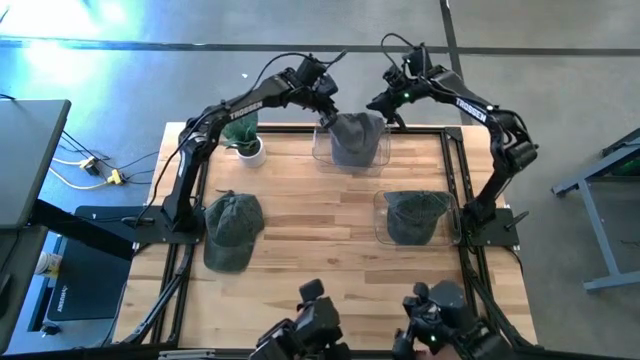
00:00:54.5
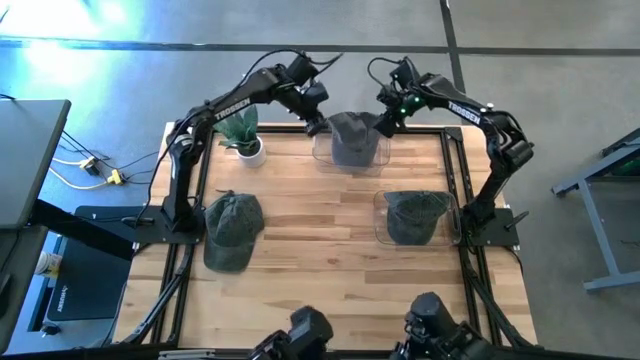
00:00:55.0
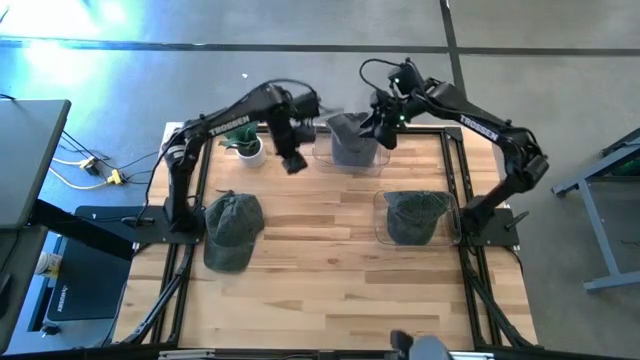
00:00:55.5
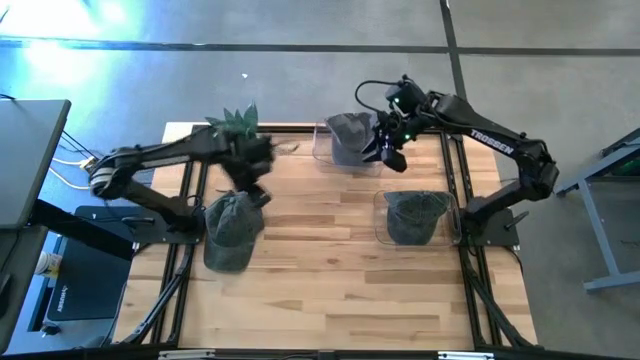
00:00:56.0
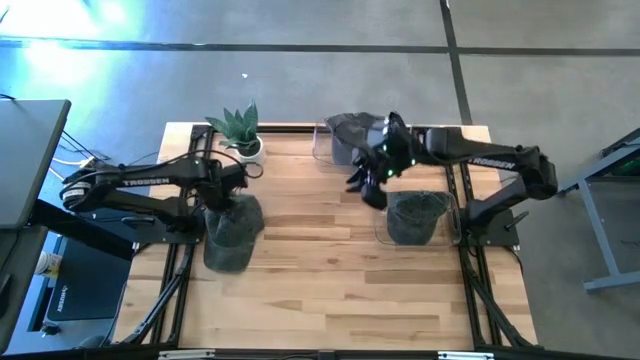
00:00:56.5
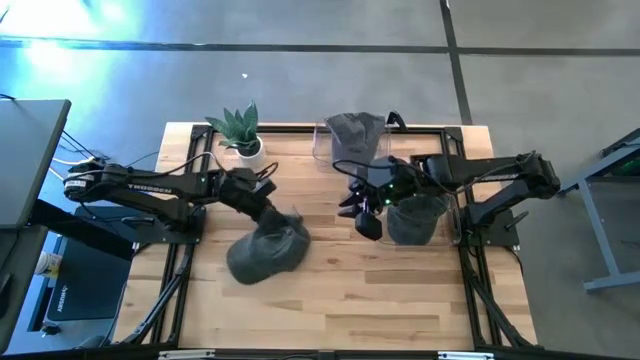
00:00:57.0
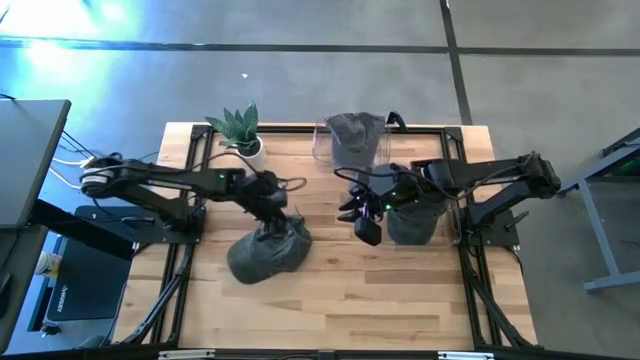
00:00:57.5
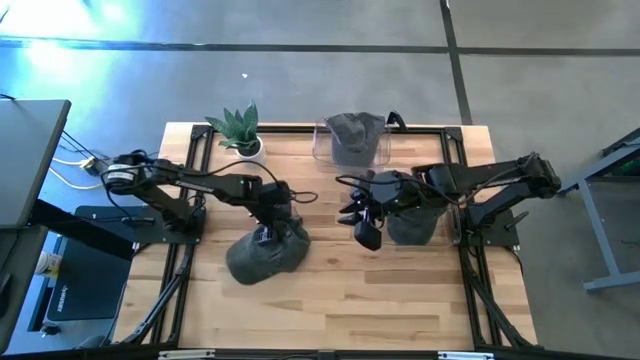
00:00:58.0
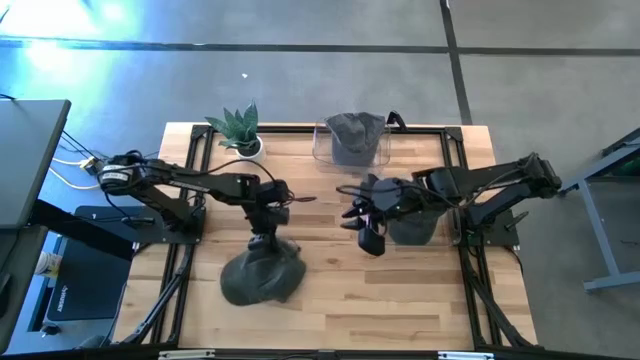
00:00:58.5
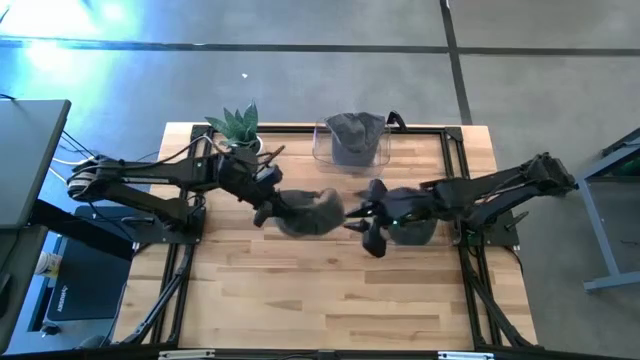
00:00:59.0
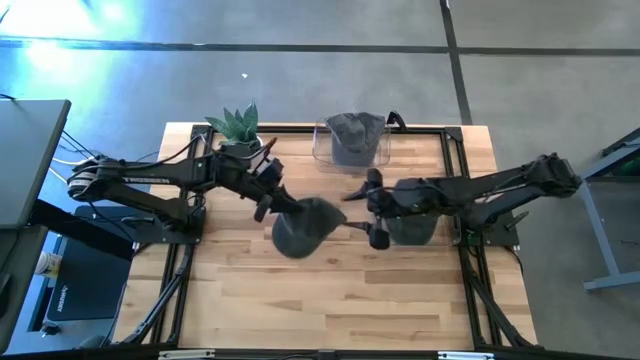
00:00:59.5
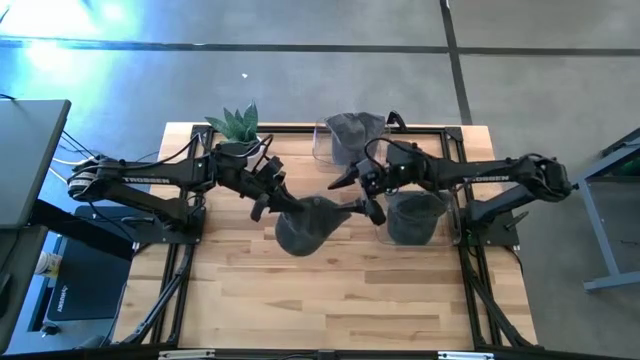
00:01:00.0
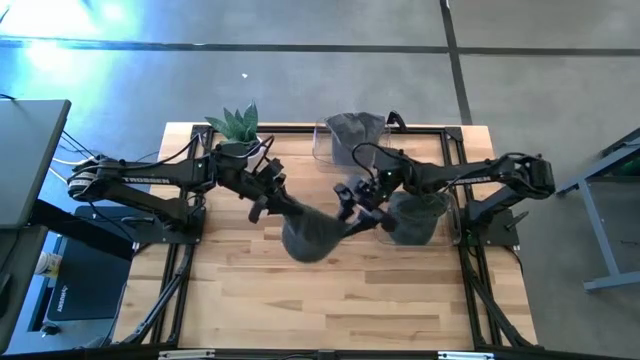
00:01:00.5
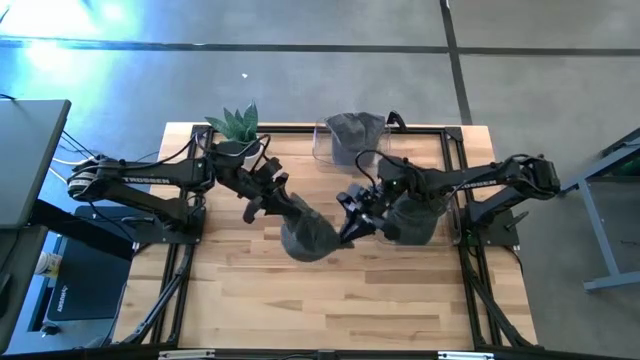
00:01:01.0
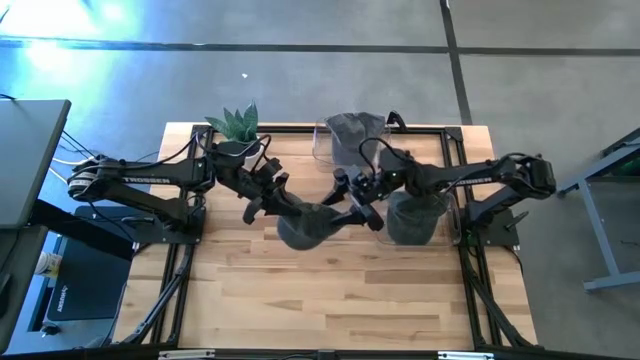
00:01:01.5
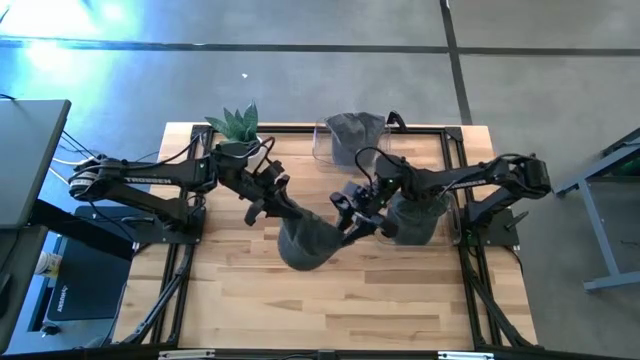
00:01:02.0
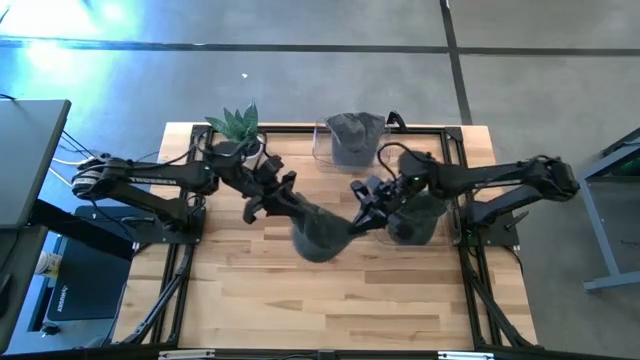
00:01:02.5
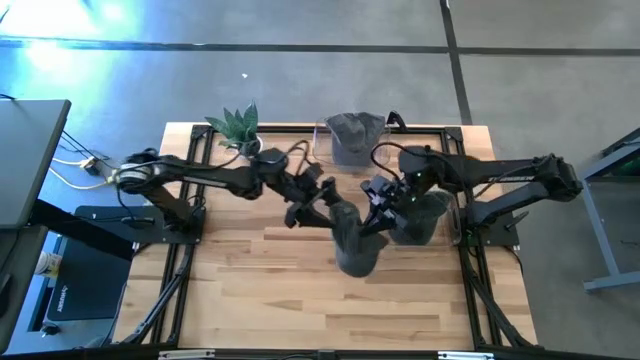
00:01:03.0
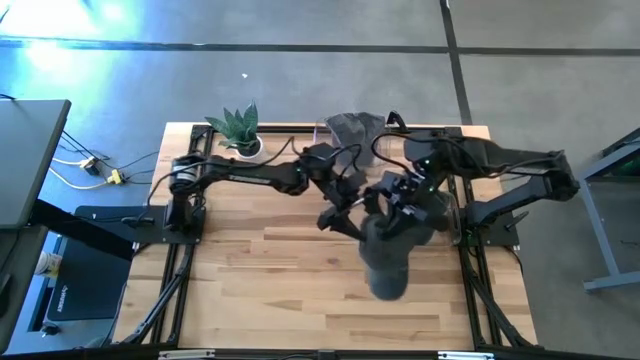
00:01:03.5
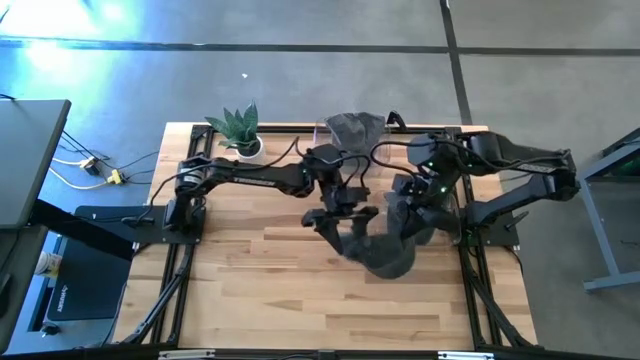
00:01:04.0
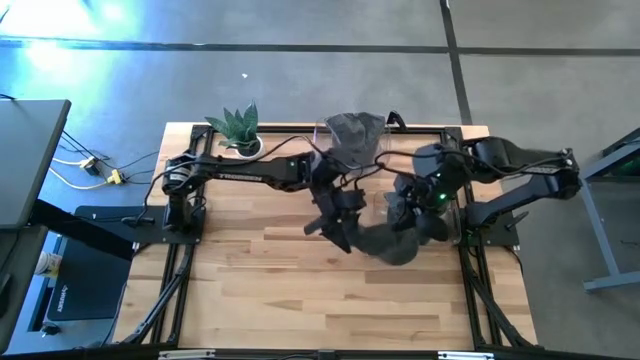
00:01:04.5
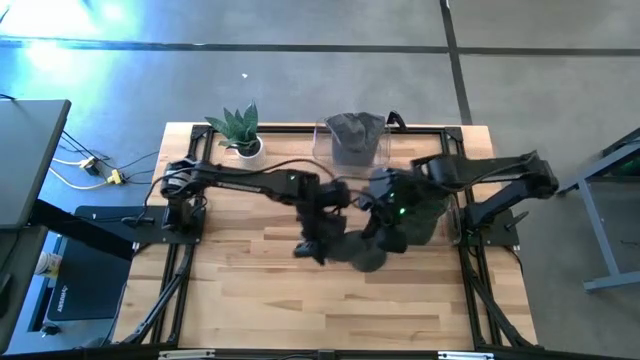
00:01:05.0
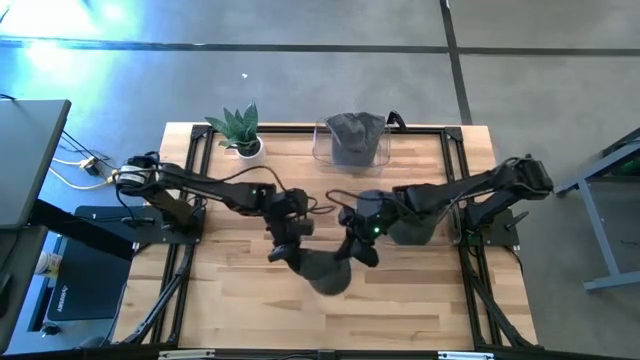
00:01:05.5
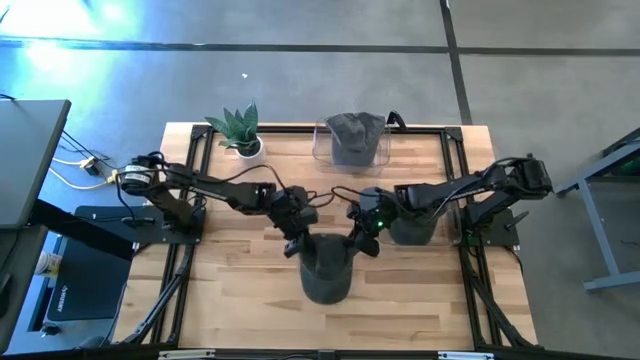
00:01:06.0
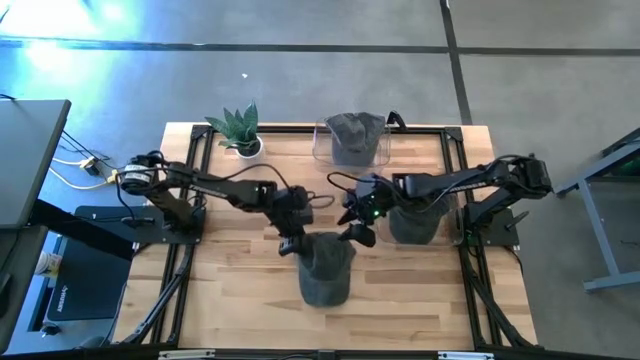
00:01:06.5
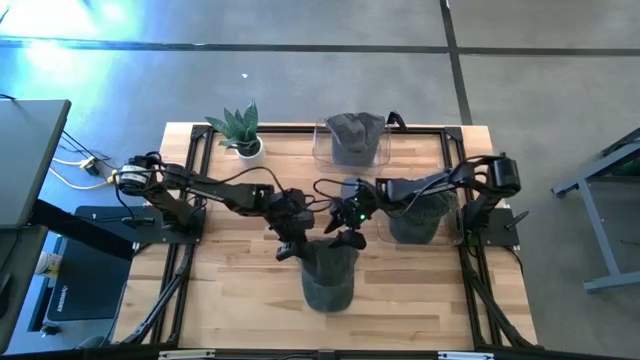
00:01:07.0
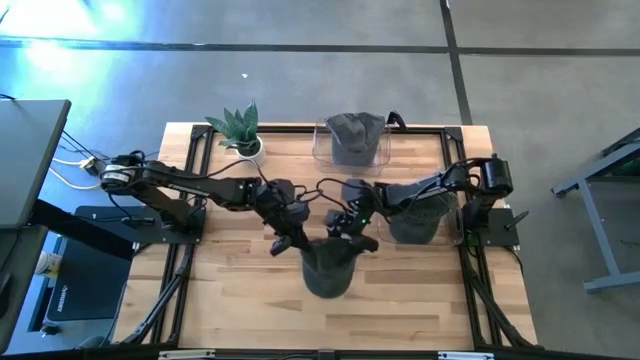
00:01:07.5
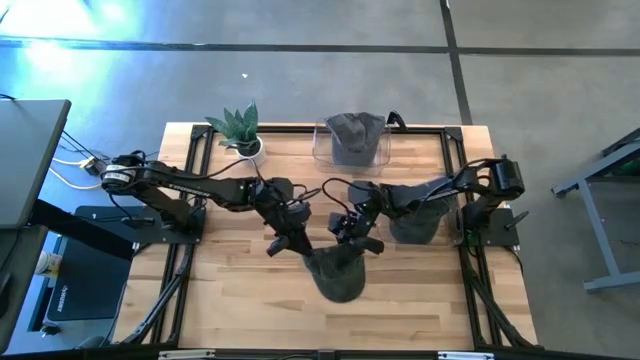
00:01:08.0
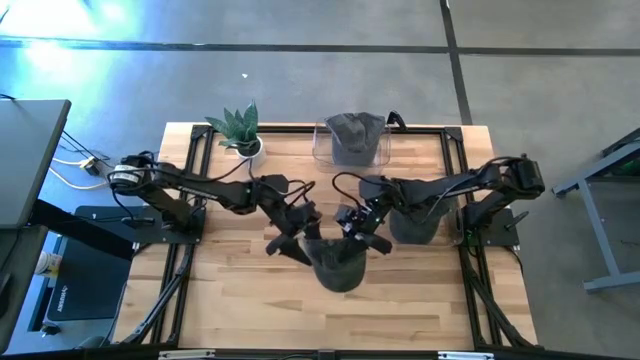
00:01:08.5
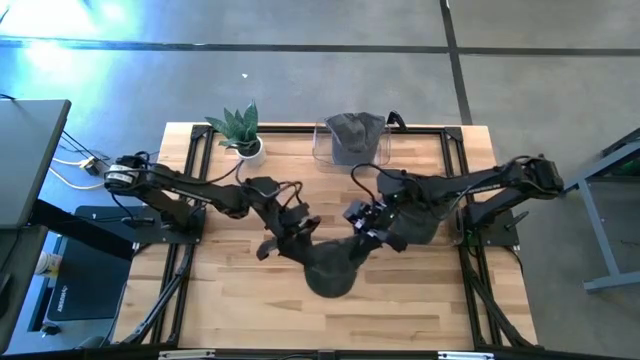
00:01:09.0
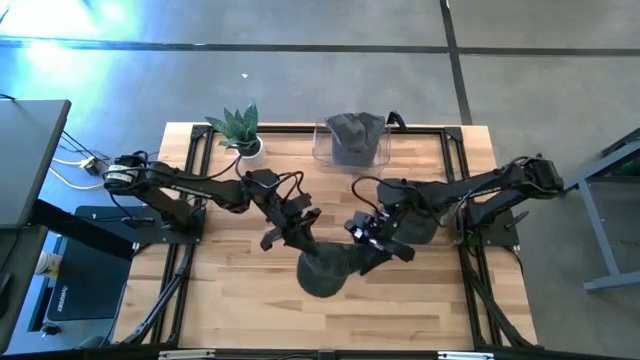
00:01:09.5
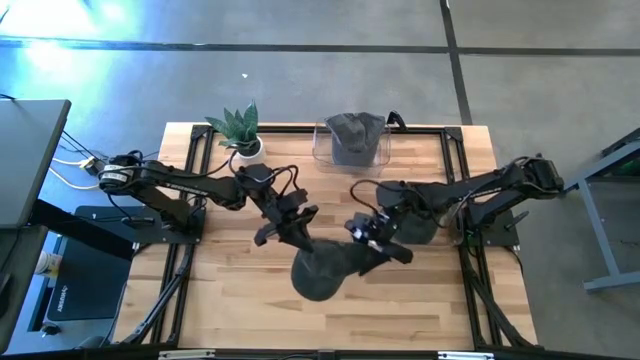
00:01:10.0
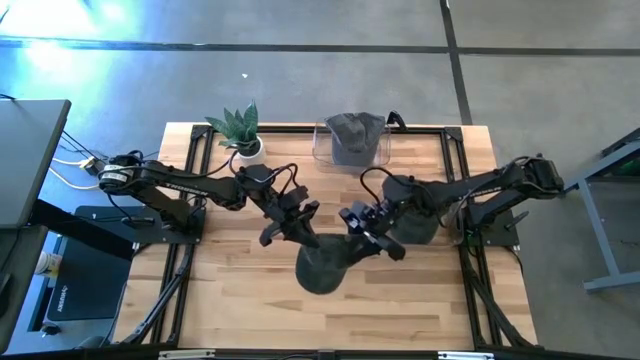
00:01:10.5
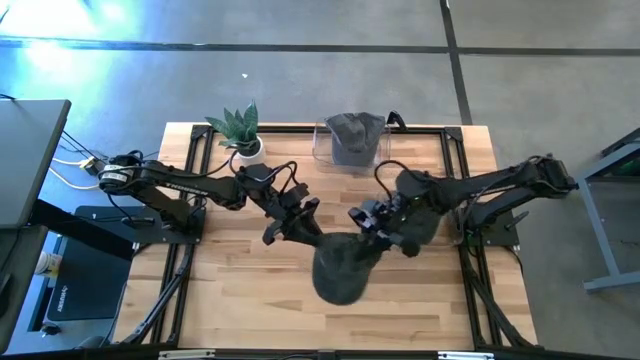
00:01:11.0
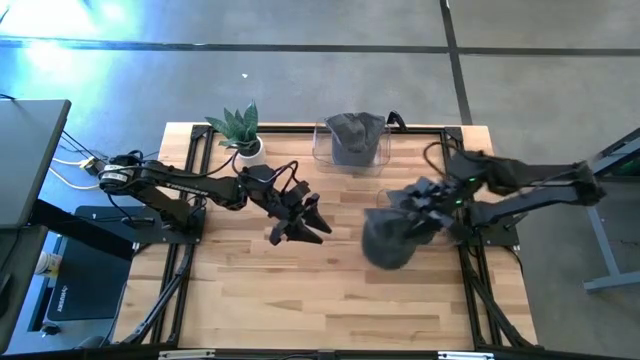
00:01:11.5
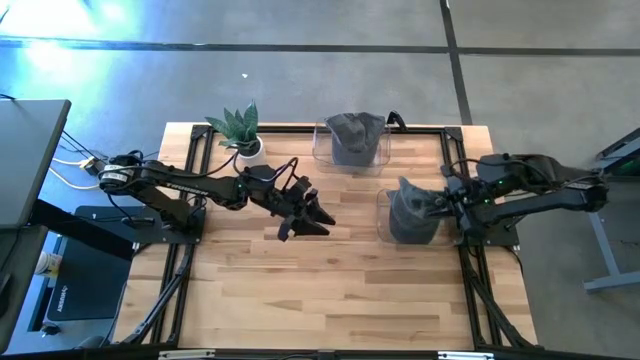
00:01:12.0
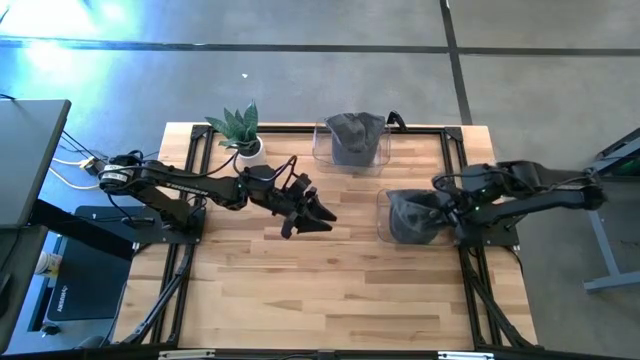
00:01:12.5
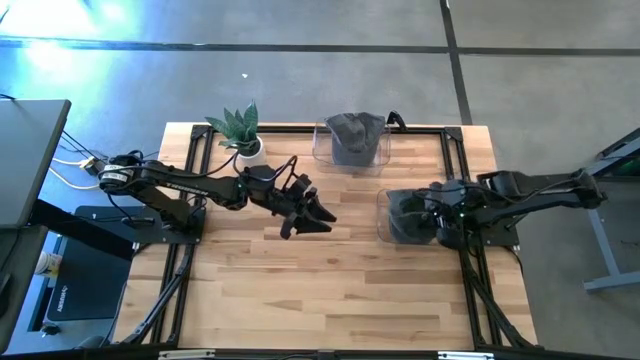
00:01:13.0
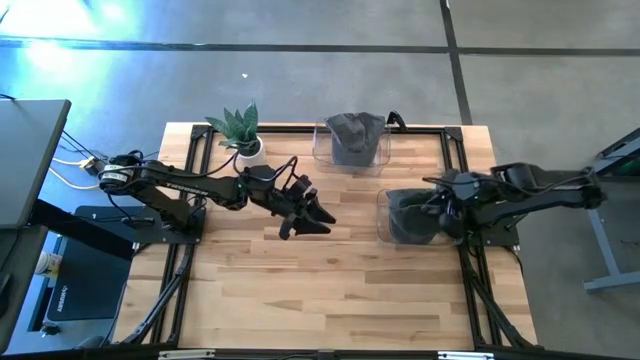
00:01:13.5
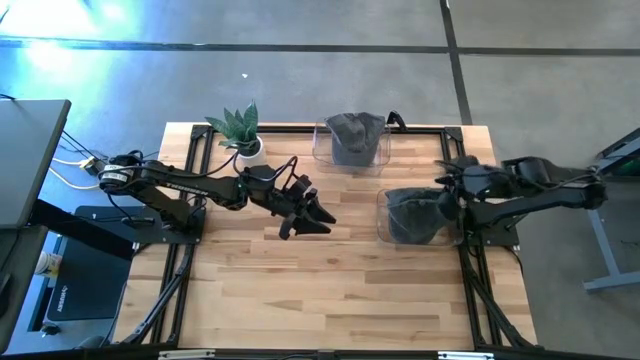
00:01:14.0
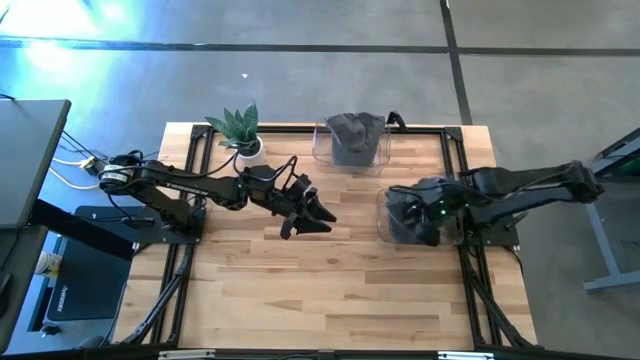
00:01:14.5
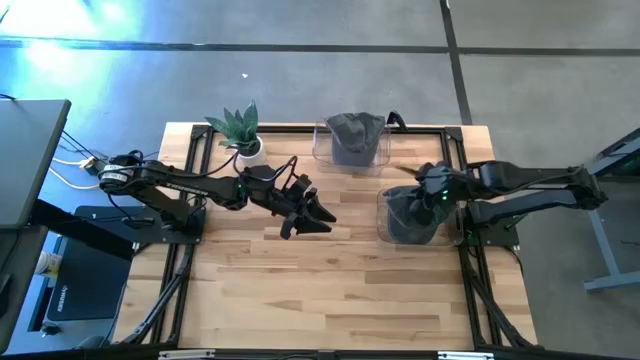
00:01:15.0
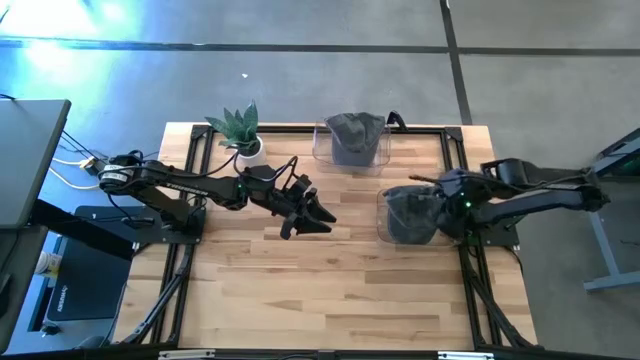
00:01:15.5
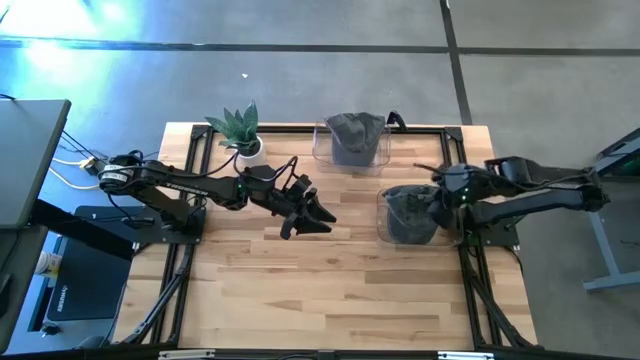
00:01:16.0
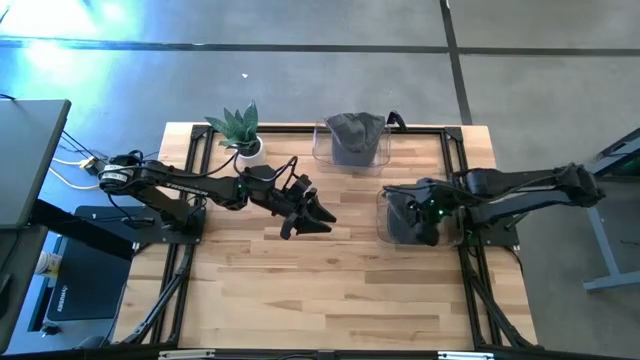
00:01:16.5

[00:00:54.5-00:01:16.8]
Task: Pick & Place hat
Put the black cap into the bottom transparent bin
